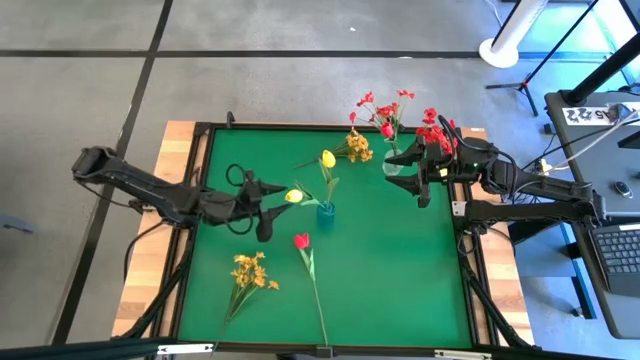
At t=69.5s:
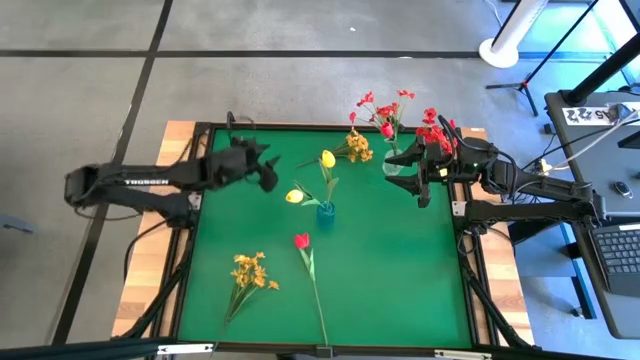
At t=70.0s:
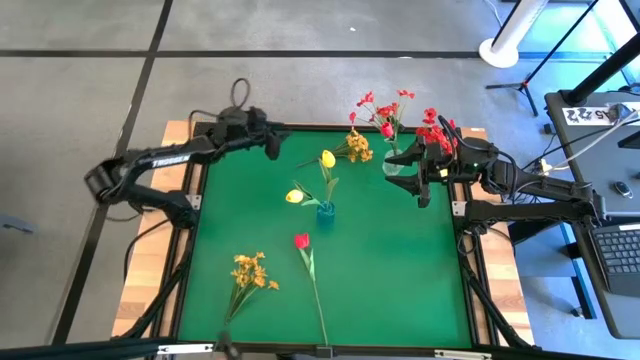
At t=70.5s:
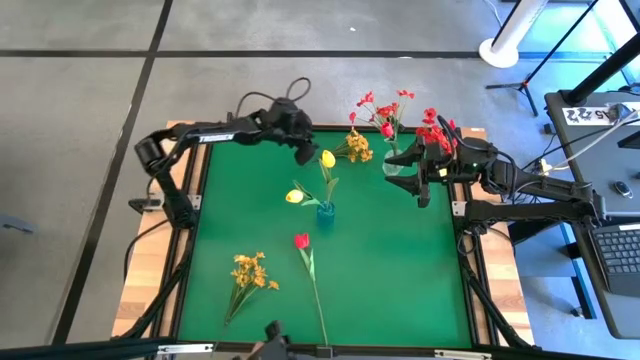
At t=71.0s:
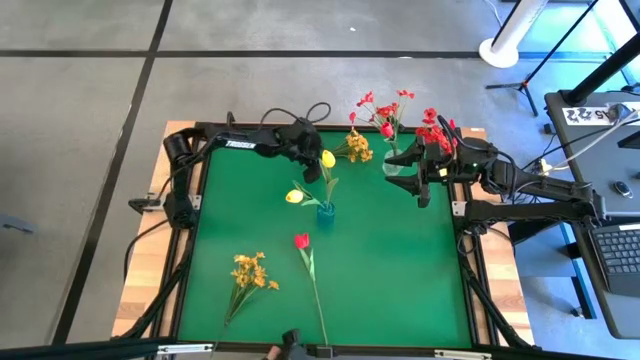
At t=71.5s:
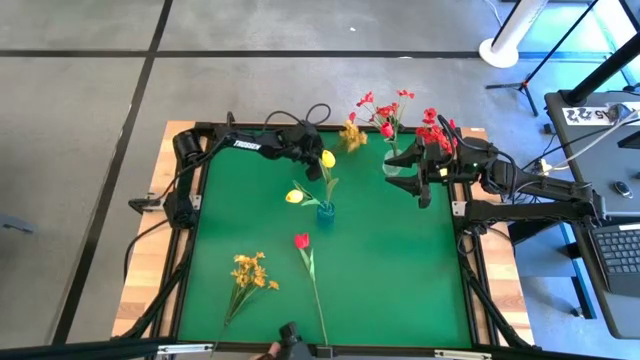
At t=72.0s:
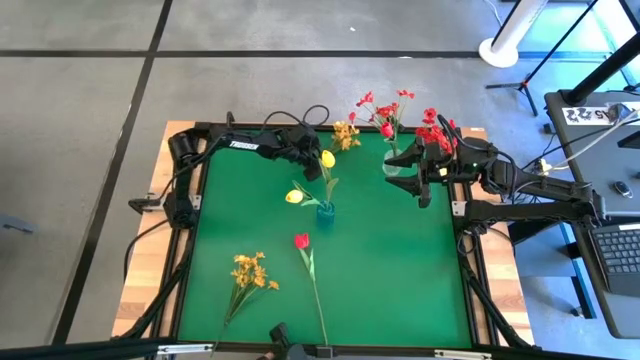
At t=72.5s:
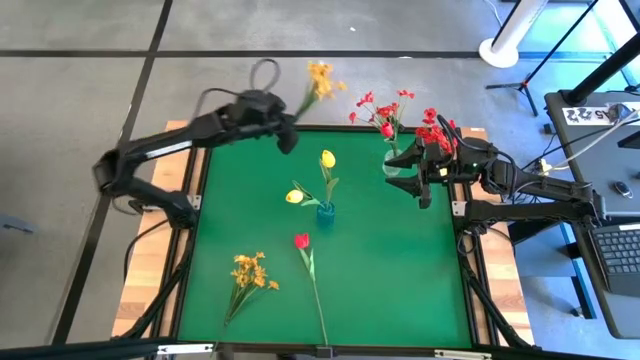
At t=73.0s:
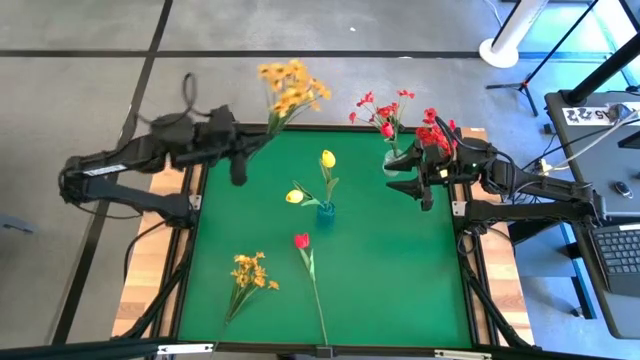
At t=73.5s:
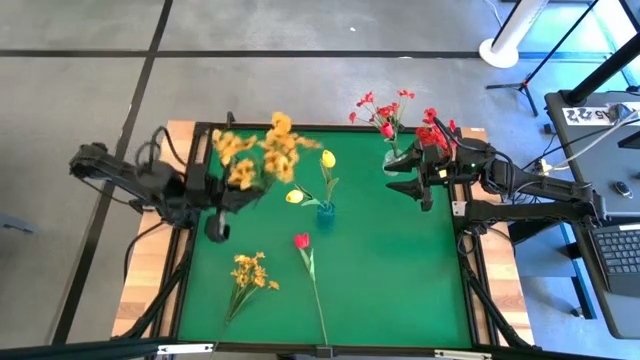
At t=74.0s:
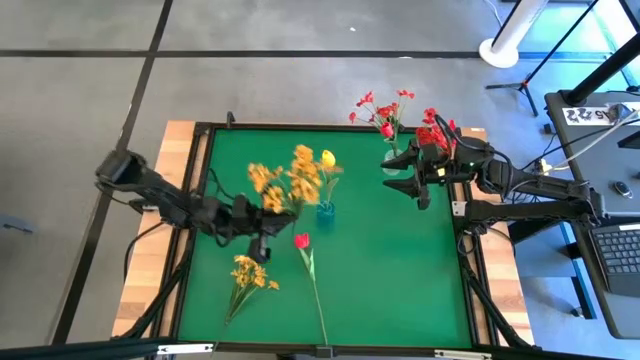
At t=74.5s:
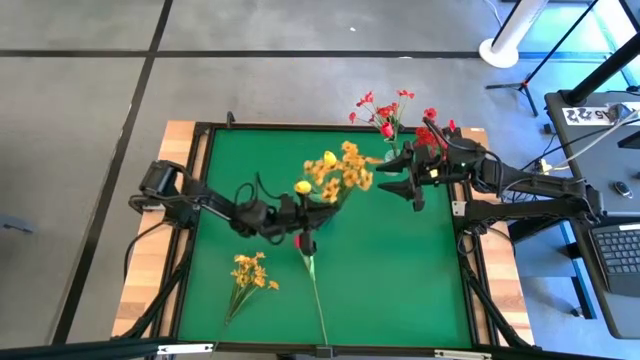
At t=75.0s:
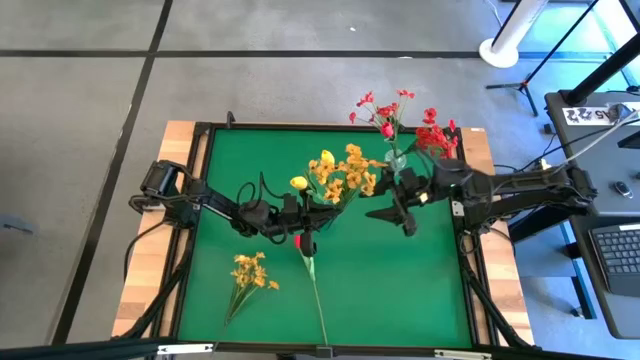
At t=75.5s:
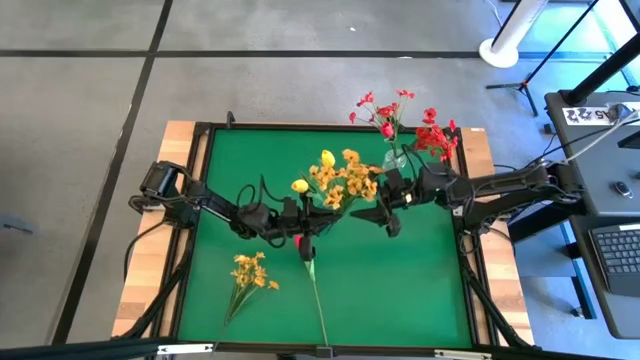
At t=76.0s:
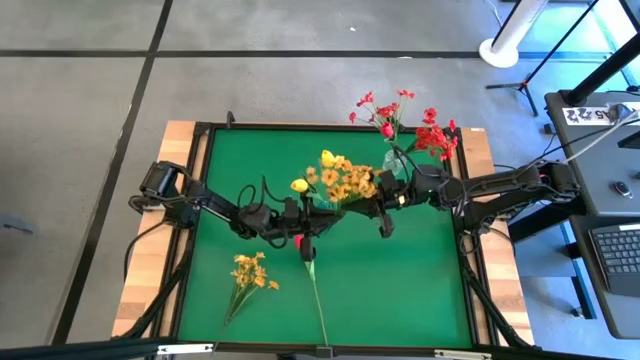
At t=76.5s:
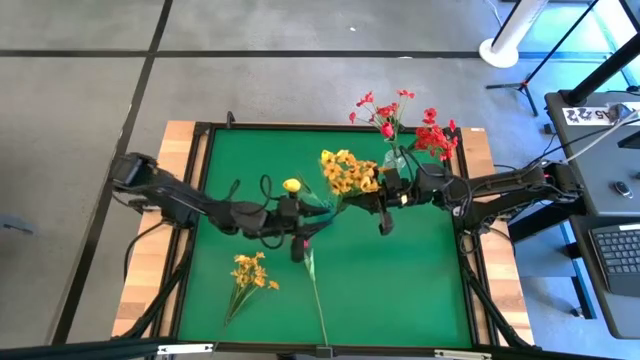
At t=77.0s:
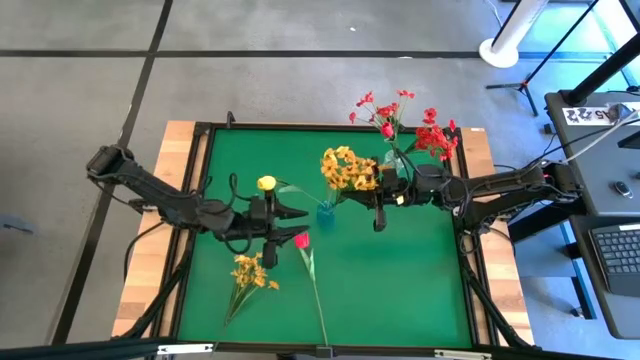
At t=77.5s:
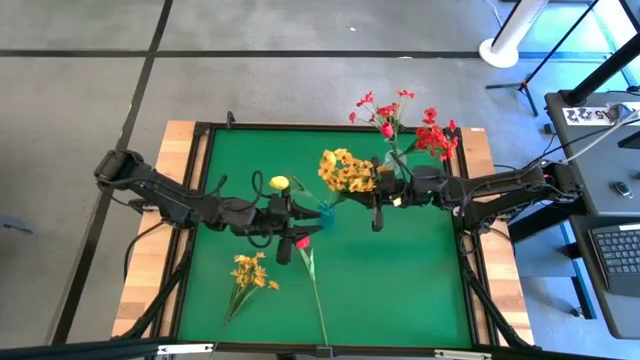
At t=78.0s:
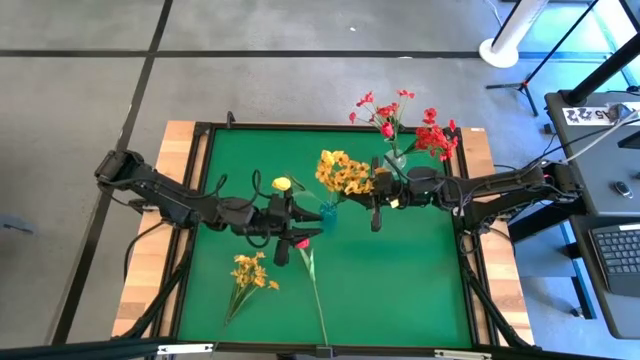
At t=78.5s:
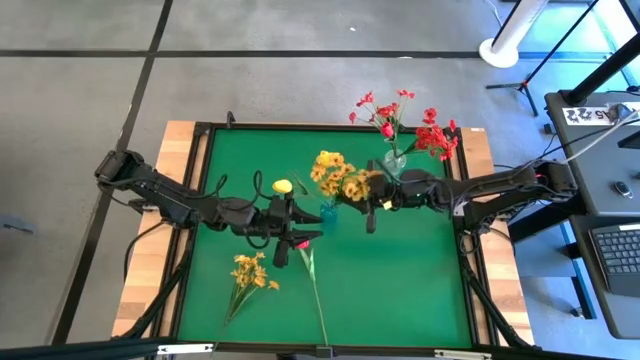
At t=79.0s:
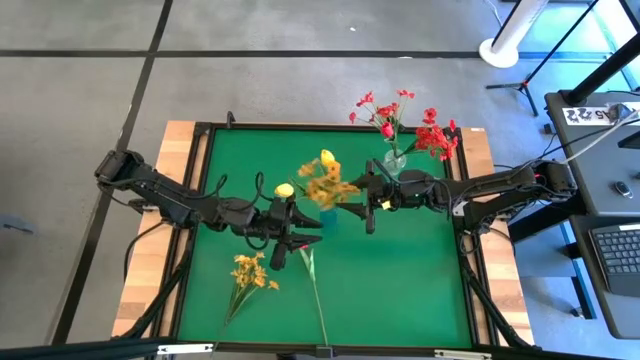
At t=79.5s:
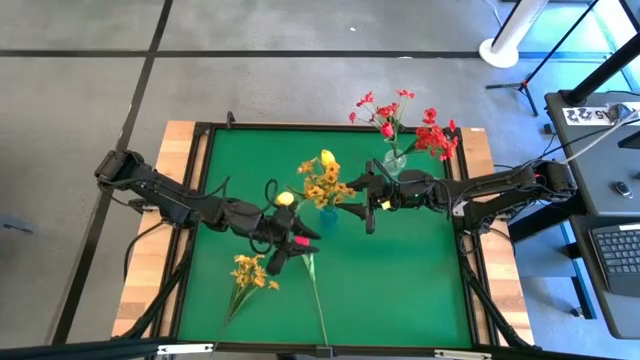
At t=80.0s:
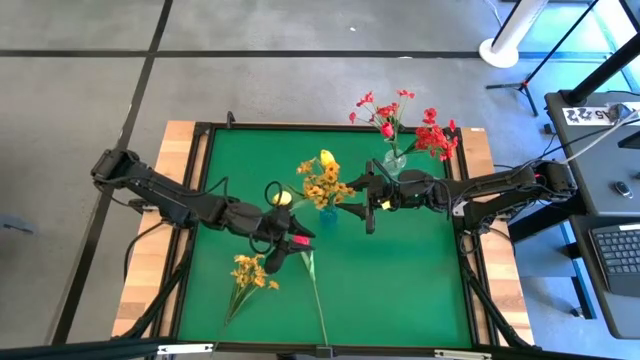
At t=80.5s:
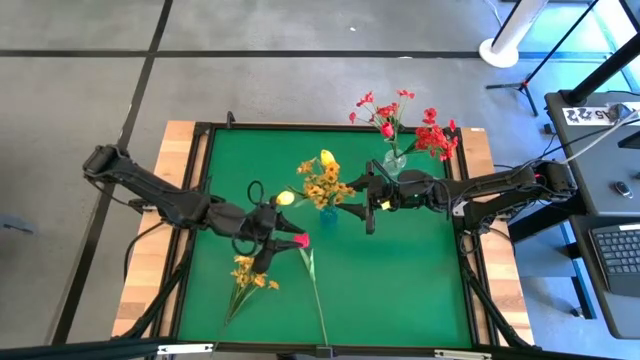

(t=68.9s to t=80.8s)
Task: Sort flowers into vase by color
Put the yellow flower into the blue vase

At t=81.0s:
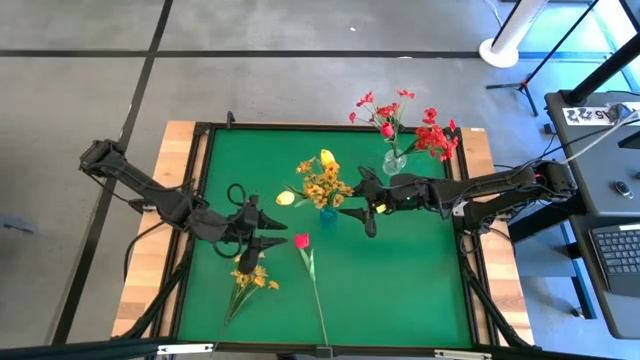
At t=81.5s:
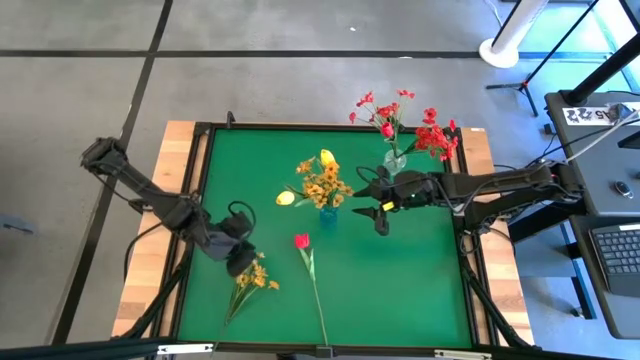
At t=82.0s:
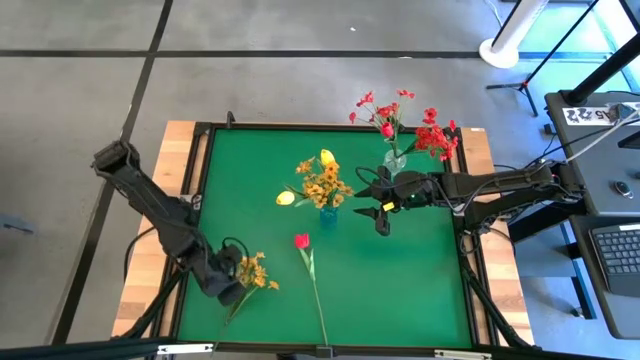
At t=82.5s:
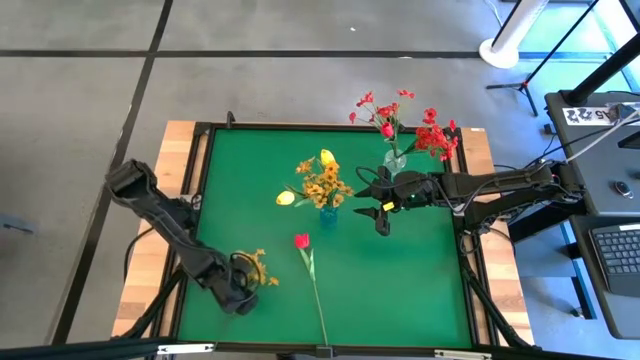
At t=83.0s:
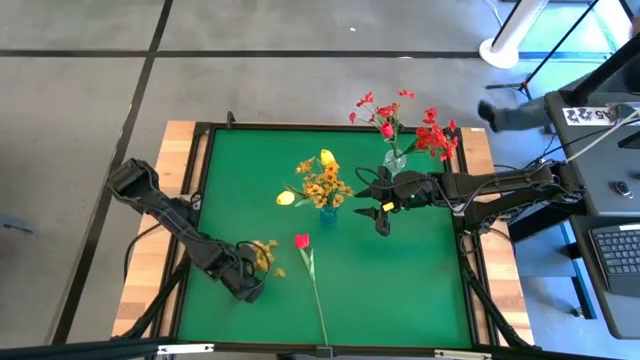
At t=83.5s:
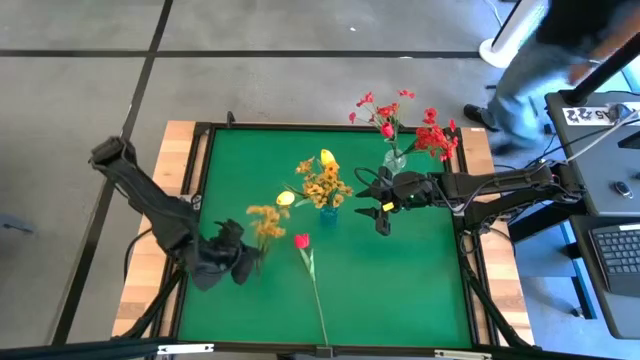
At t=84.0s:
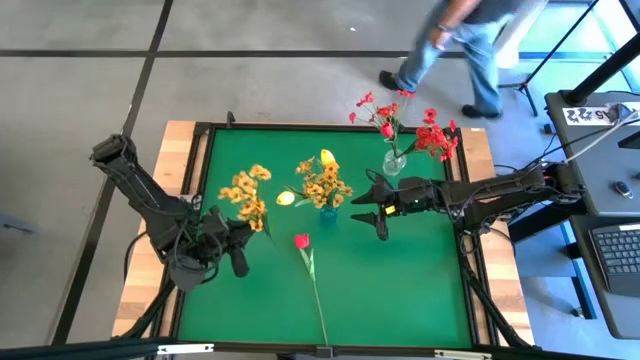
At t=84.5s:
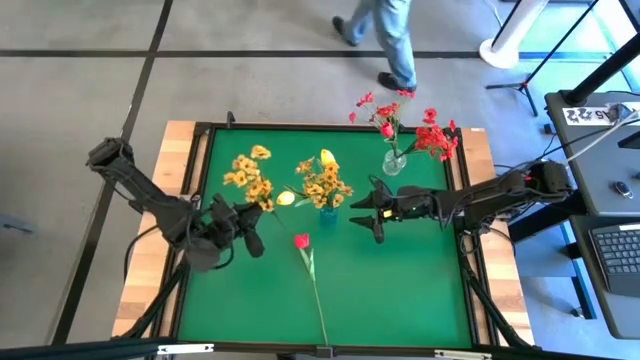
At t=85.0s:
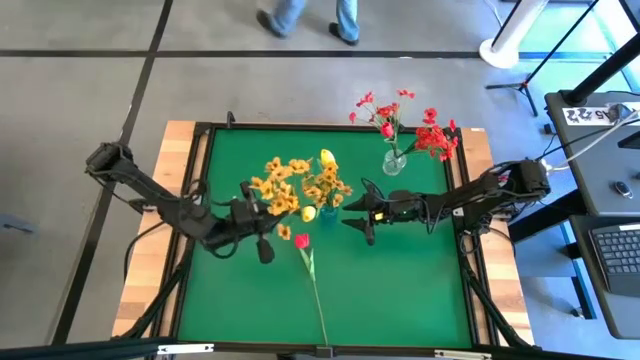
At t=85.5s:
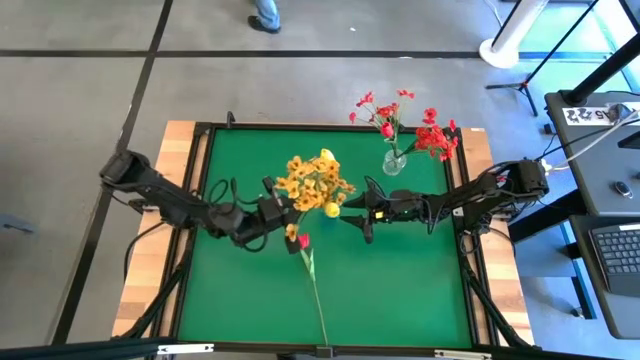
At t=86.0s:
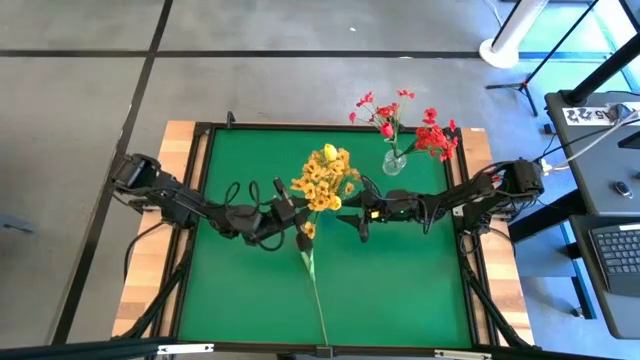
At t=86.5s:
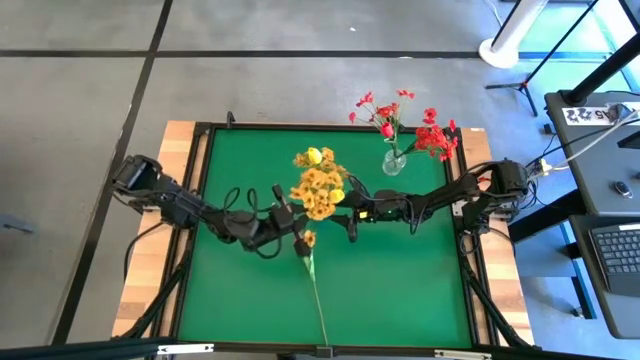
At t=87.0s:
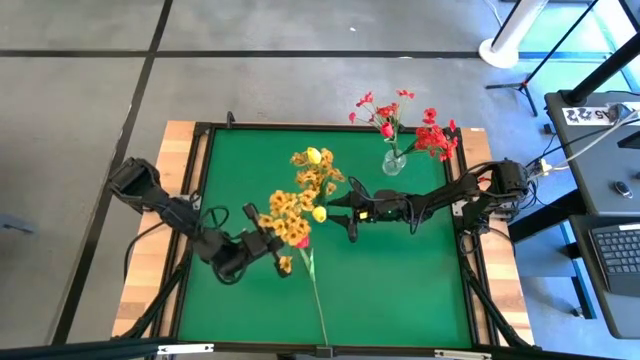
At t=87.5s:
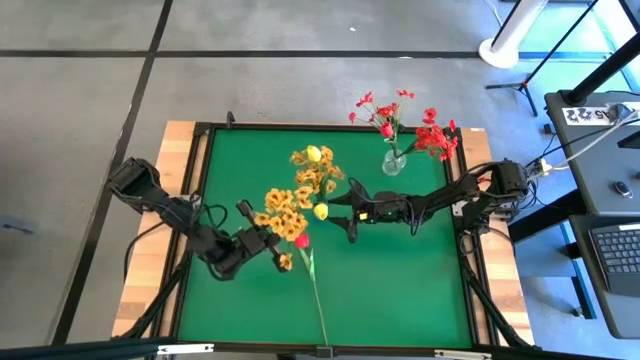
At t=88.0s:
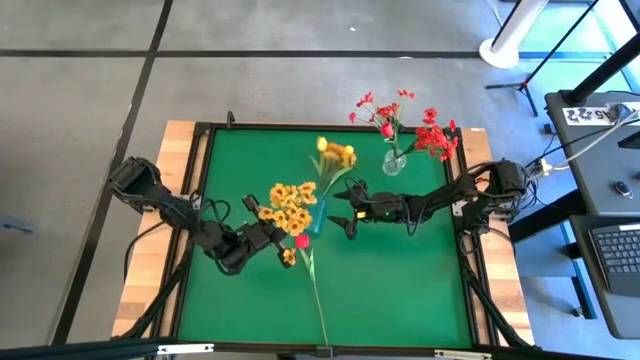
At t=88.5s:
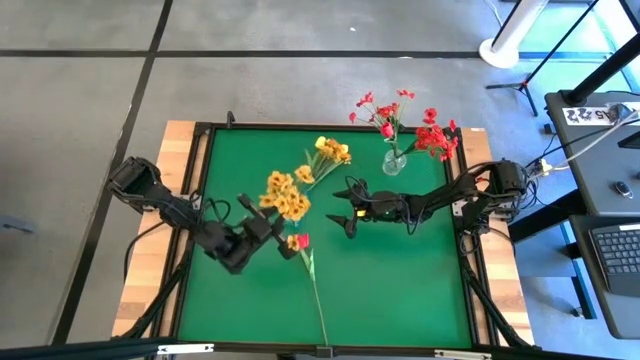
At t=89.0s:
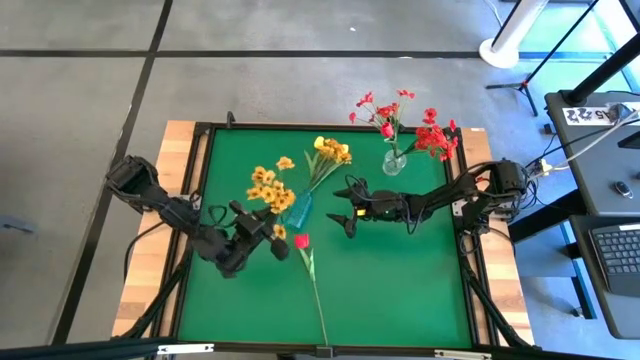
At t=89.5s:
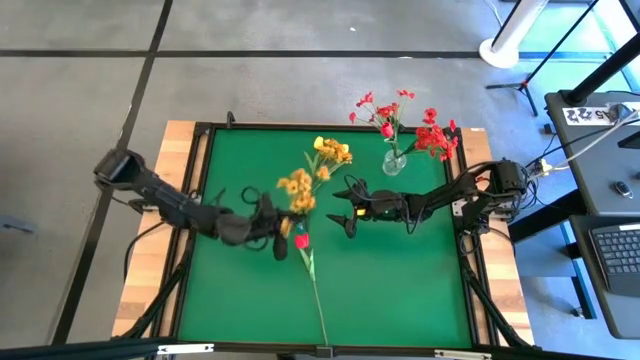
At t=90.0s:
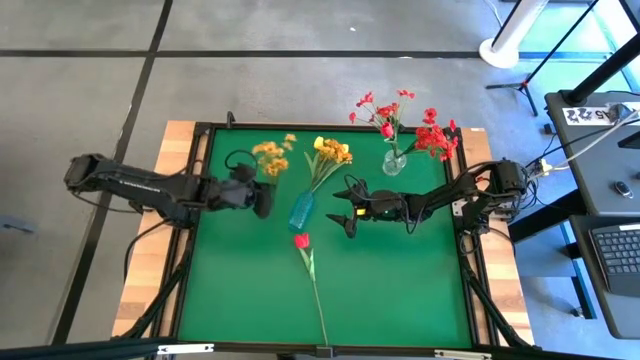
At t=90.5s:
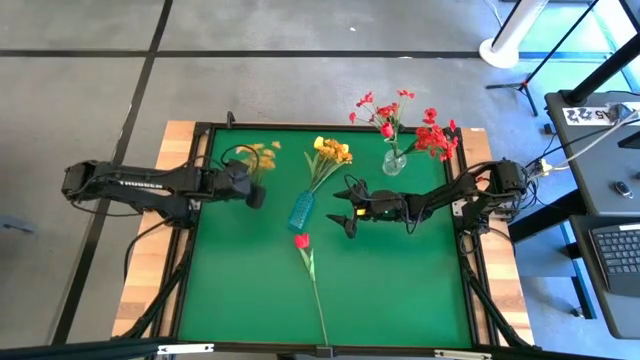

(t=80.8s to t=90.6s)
Put the yellow flower into the blue vase
